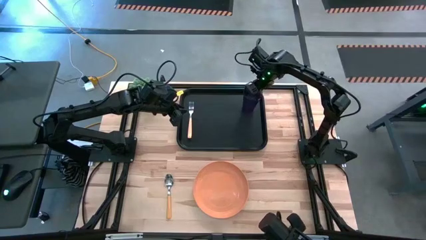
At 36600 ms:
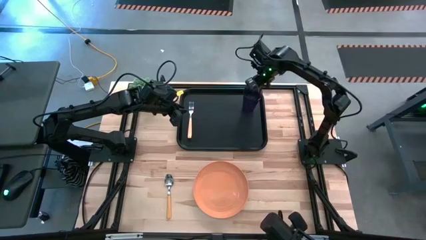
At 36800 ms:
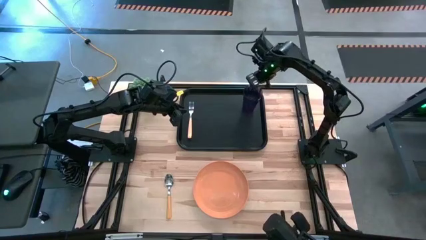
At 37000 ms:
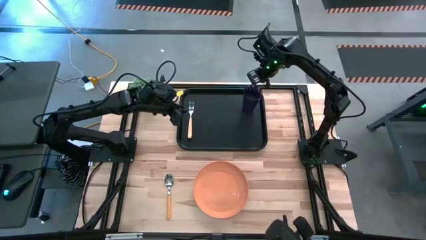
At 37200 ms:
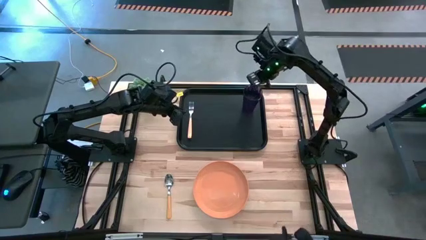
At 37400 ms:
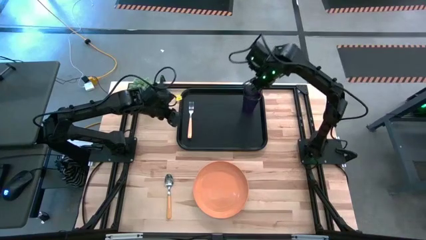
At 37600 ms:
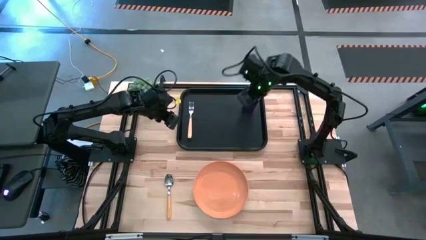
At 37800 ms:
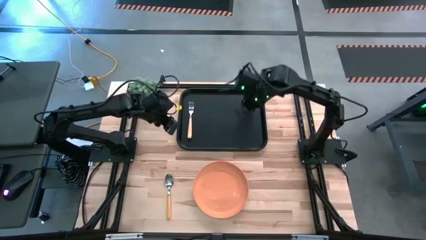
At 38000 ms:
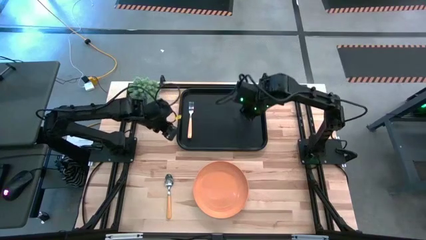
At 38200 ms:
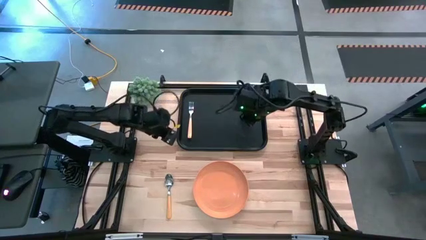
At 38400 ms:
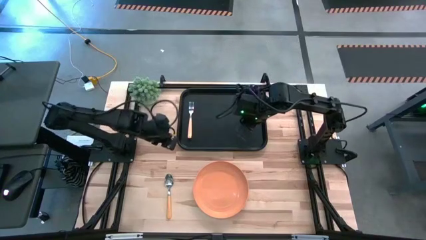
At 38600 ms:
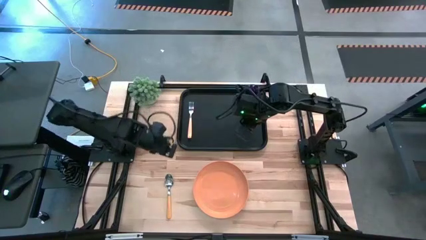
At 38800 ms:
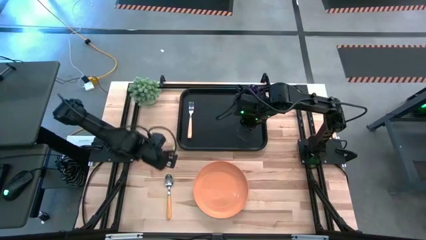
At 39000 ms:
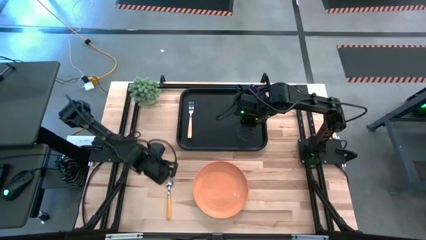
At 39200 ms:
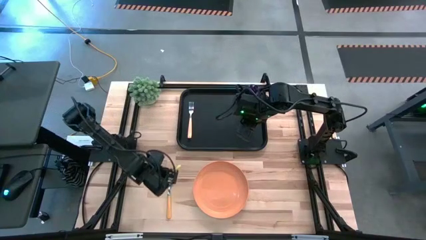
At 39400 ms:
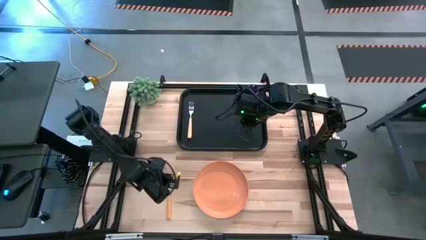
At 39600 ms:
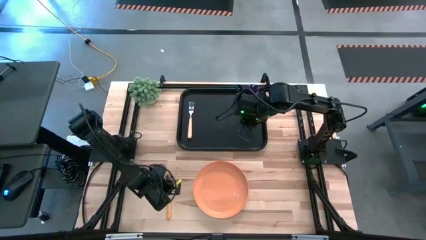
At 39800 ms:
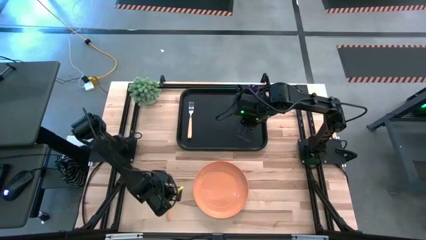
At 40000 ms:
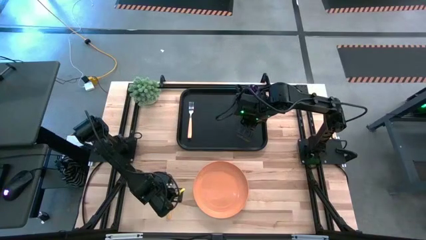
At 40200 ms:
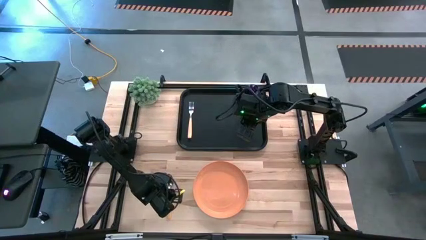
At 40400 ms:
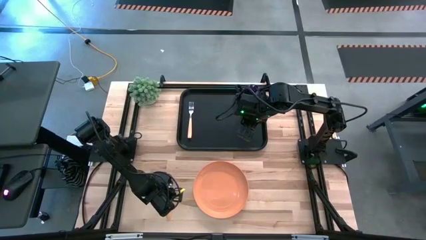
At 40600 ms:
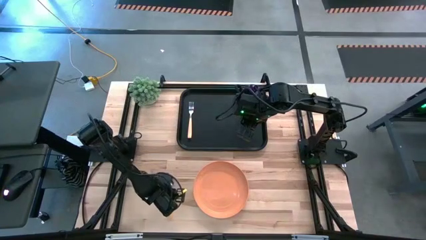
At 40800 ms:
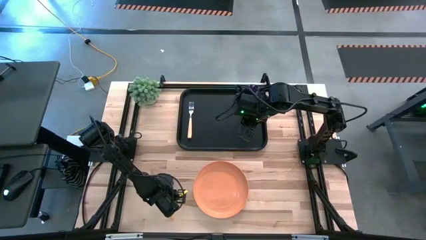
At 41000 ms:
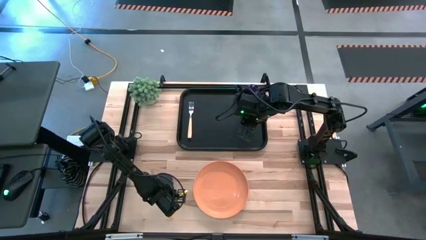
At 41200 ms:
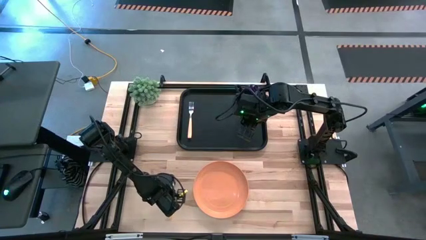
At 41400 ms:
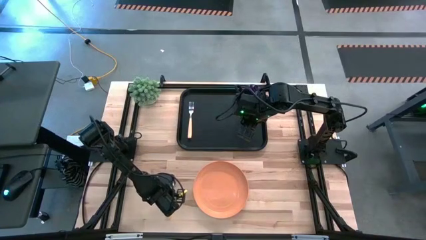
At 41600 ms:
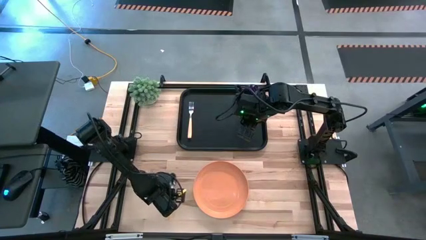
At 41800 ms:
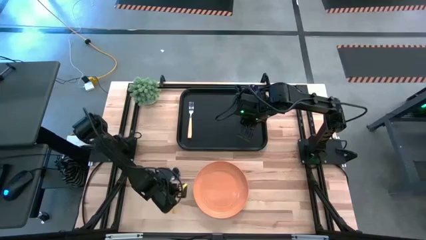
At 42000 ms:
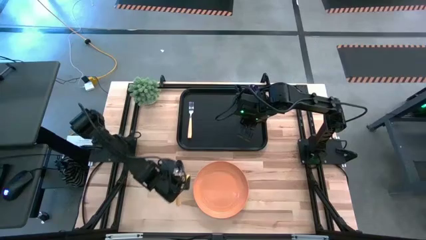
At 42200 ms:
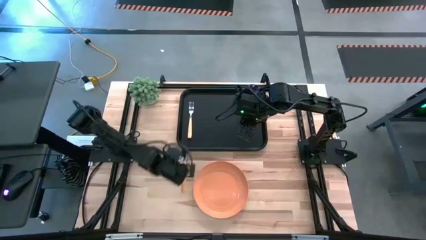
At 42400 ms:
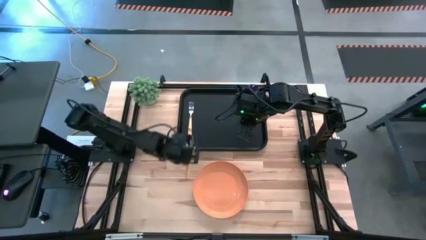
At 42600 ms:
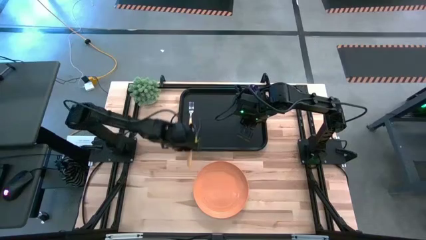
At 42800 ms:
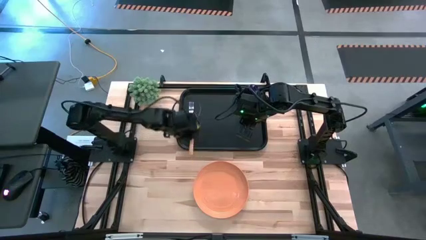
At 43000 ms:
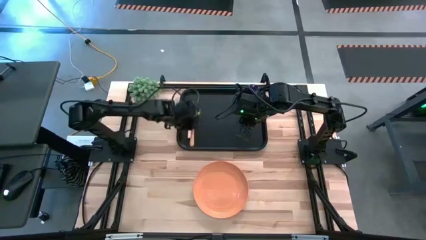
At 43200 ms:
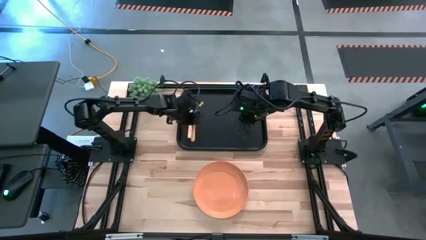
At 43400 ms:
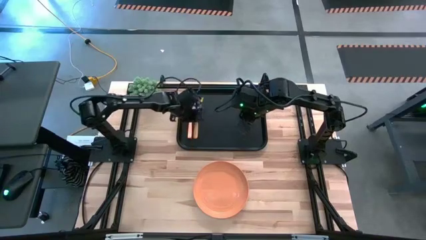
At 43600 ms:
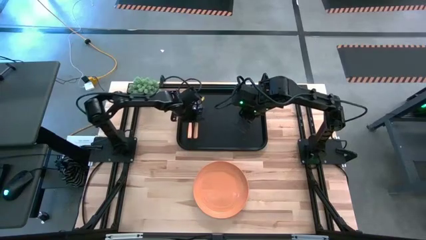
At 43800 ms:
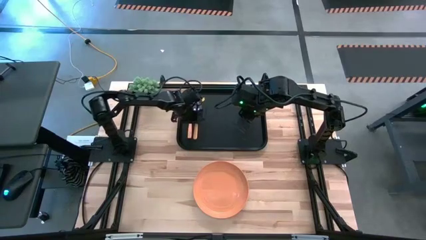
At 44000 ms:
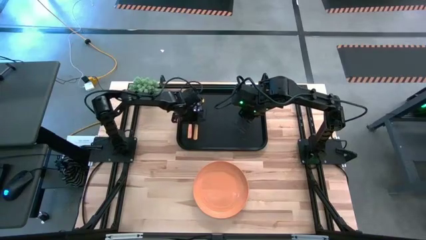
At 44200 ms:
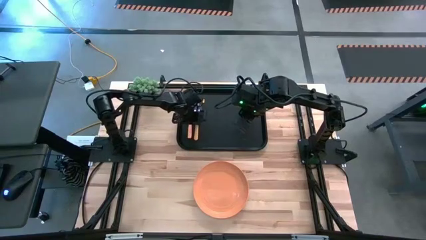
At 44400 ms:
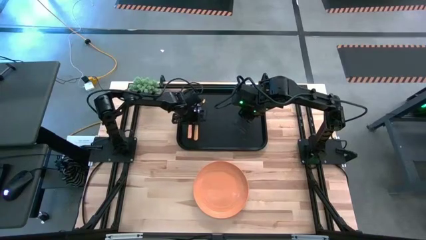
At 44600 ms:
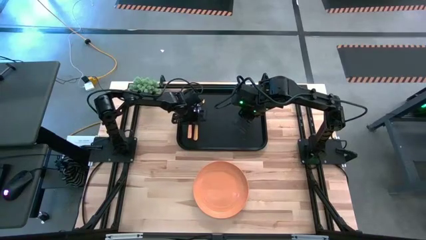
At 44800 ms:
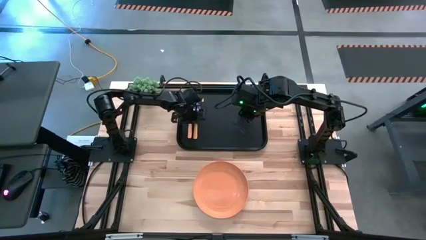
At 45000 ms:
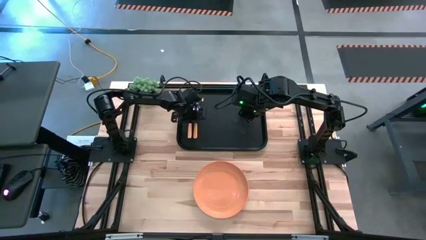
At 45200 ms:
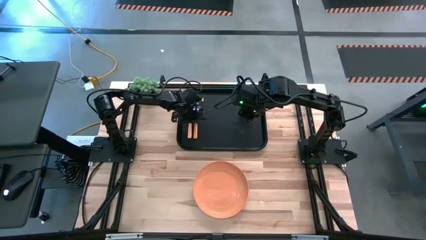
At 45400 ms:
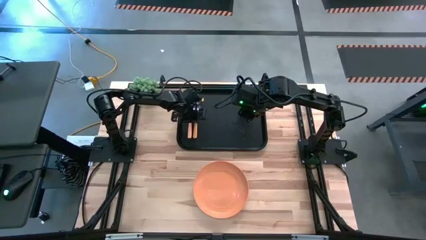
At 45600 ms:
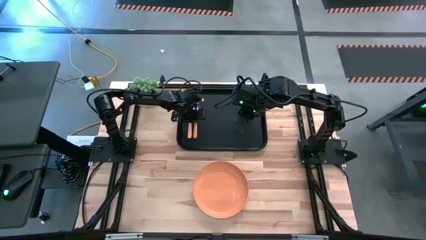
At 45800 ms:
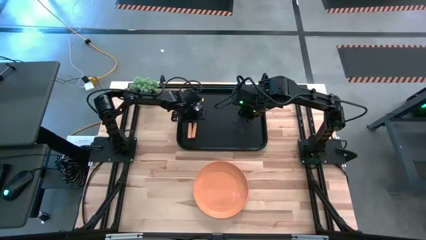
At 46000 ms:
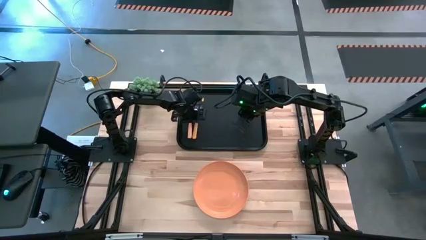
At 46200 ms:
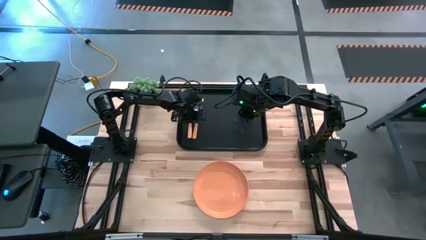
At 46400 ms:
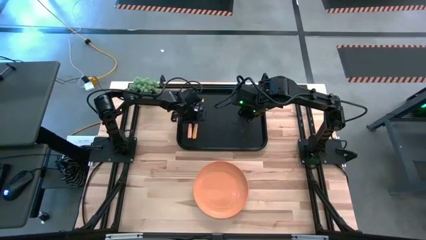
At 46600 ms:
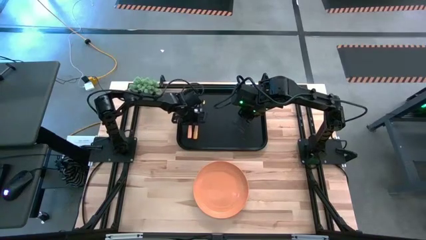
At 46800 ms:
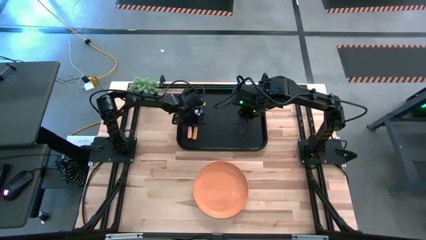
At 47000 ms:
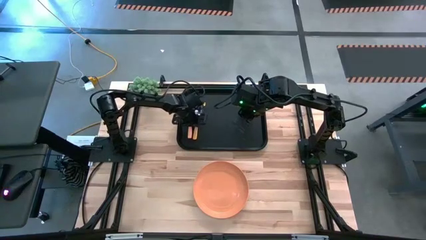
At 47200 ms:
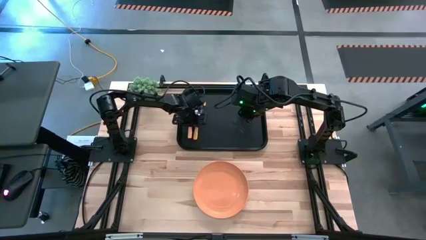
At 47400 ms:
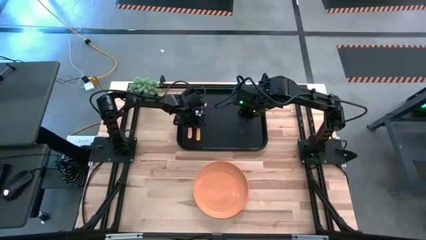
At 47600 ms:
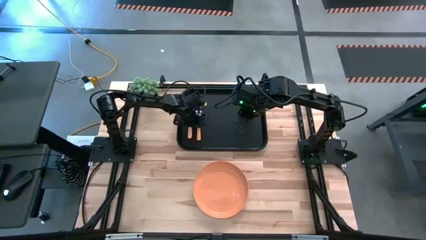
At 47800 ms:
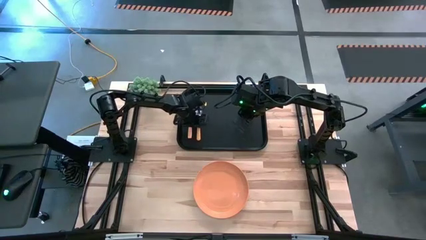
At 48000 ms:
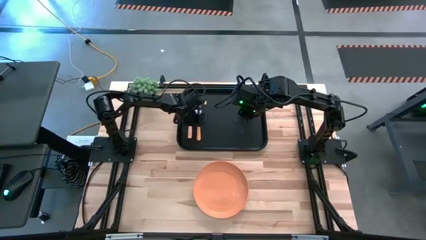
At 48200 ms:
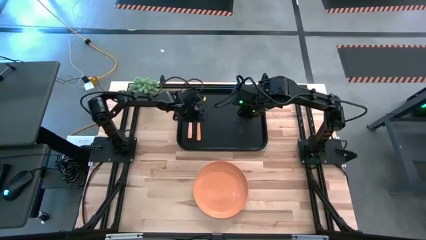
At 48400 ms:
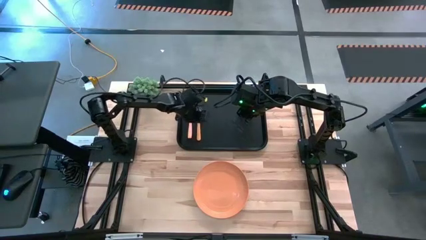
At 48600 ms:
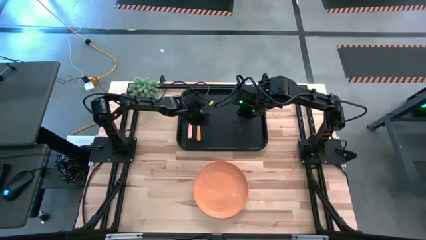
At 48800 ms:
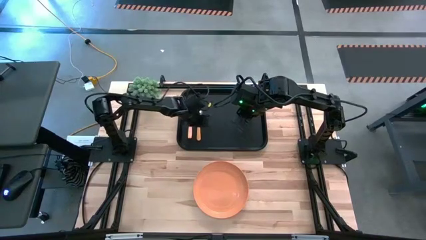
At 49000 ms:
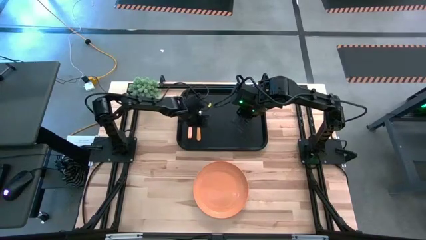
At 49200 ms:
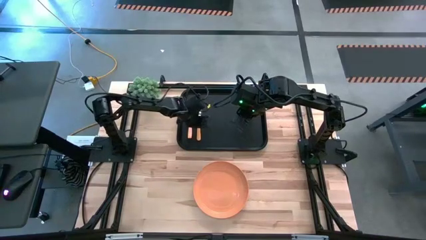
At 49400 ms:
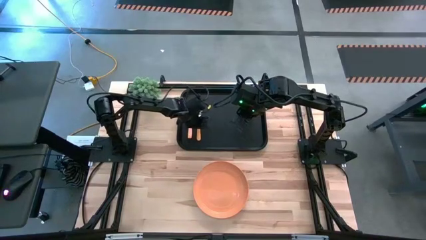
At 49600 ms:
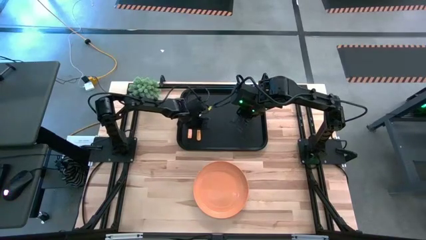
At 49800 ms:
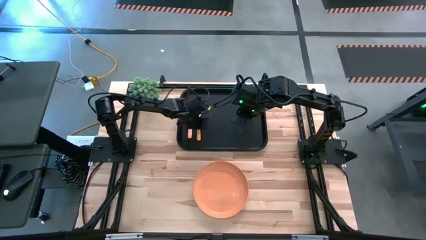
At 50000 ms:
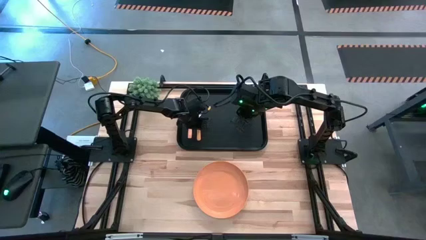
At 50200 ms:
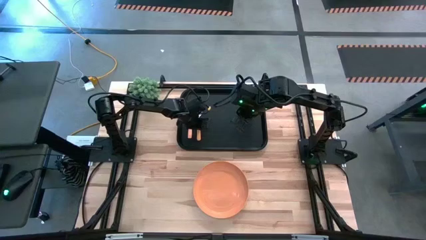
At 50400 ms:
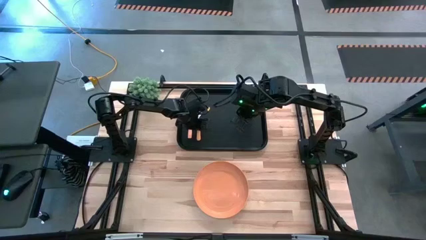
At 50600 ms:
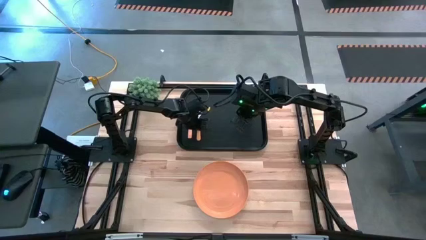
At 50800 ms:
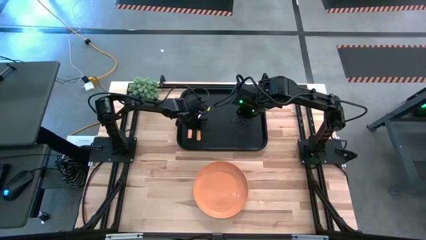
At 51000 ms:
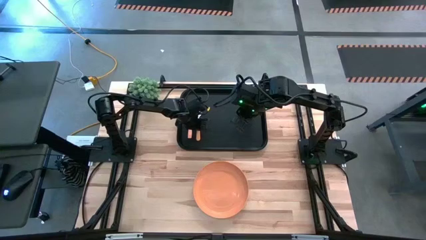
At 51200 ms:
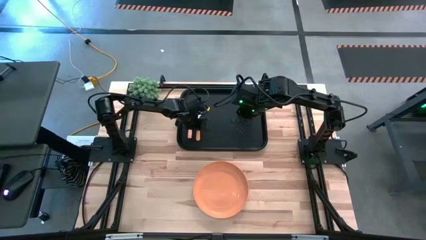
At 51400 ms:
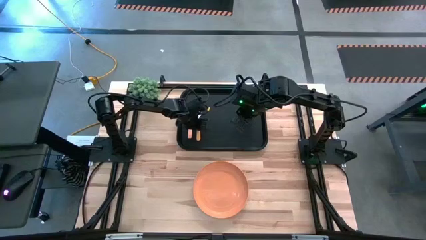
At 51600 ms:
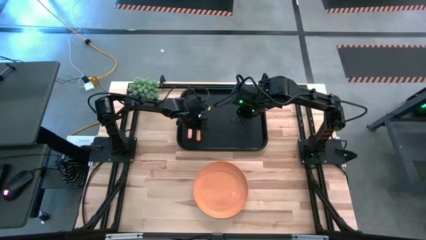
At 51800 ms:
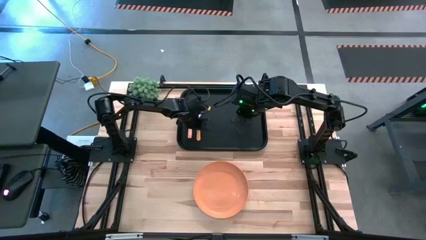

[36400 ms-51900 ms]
Task: Pick and place plate/cup/fork/spoon on tray
Put the orange spoon to the right of the fork on the black serving tray
